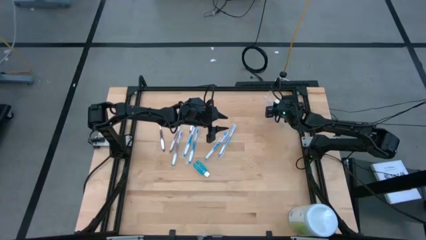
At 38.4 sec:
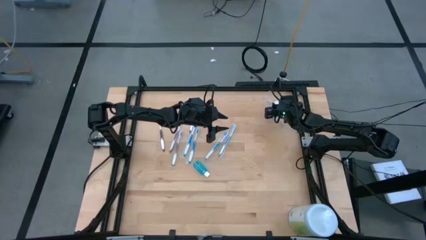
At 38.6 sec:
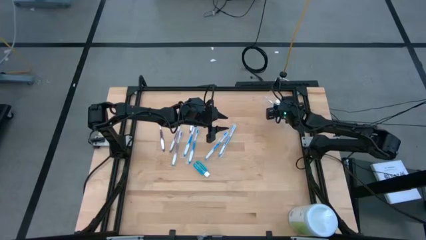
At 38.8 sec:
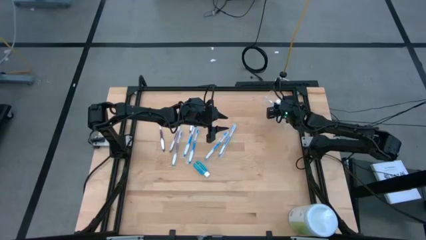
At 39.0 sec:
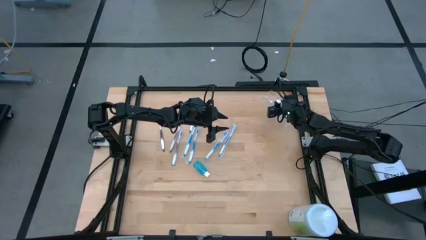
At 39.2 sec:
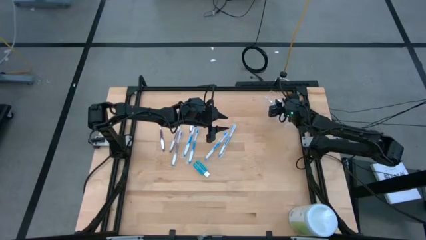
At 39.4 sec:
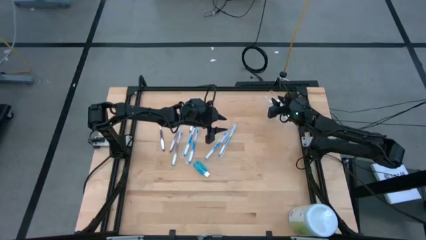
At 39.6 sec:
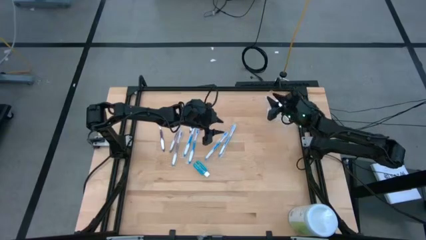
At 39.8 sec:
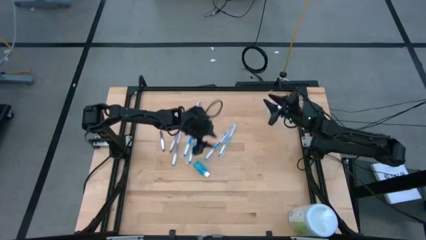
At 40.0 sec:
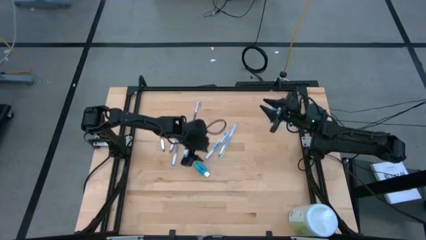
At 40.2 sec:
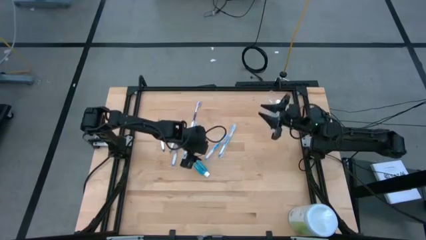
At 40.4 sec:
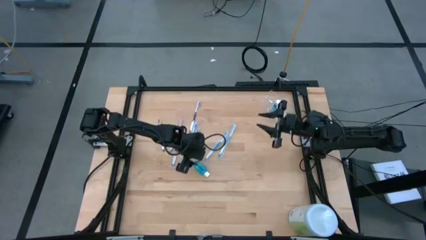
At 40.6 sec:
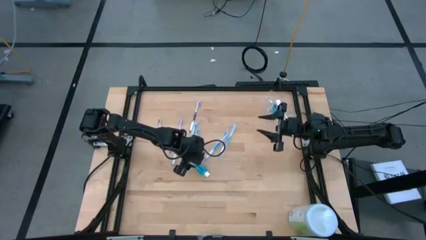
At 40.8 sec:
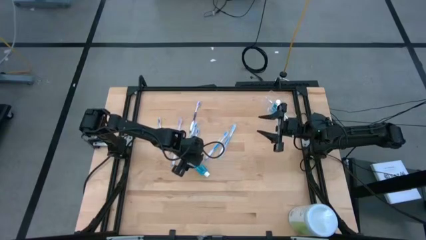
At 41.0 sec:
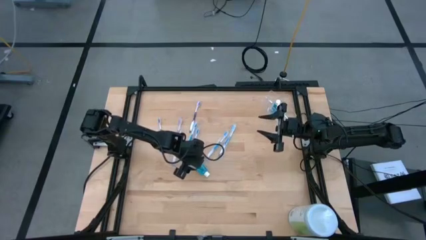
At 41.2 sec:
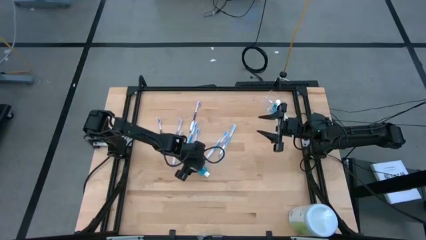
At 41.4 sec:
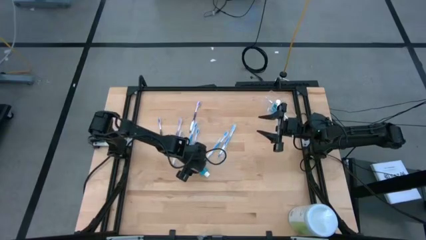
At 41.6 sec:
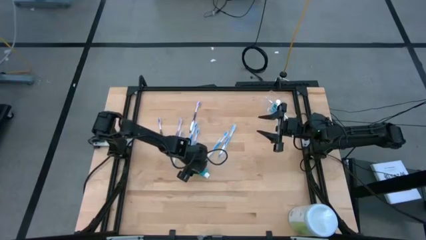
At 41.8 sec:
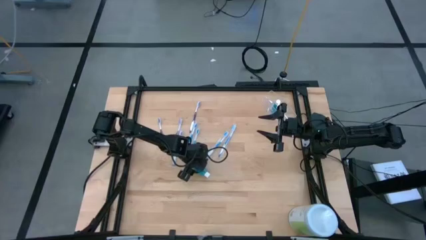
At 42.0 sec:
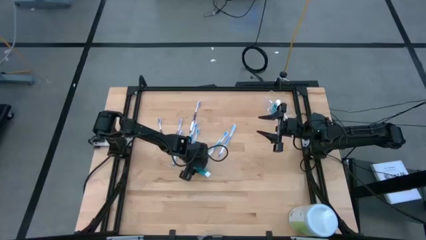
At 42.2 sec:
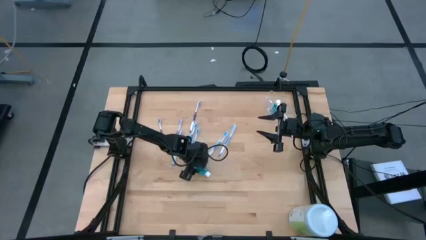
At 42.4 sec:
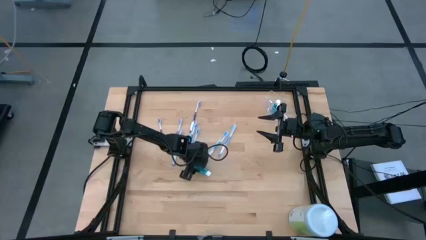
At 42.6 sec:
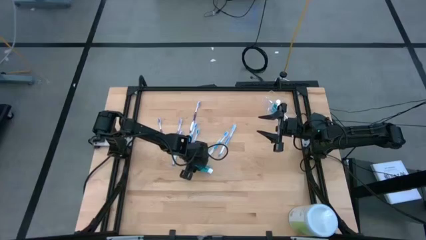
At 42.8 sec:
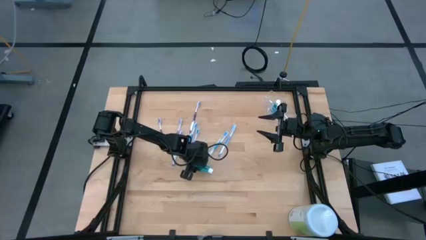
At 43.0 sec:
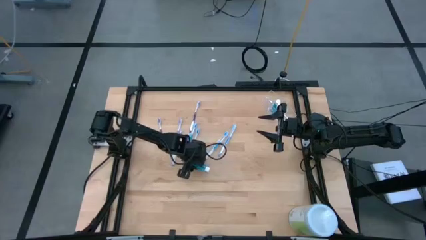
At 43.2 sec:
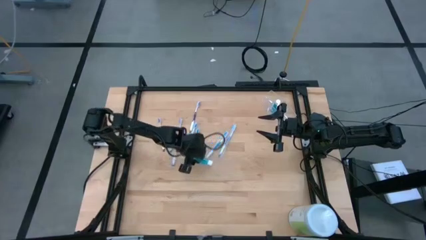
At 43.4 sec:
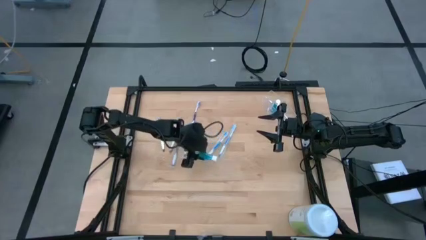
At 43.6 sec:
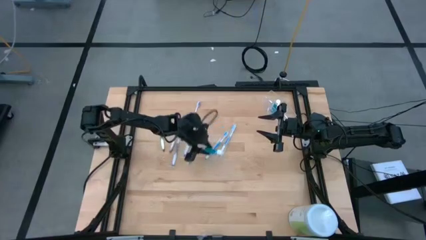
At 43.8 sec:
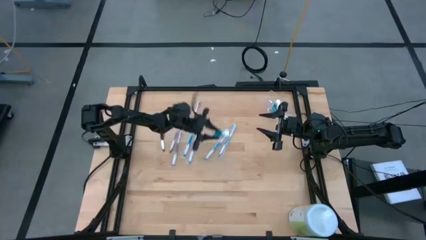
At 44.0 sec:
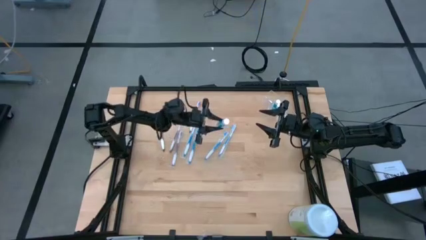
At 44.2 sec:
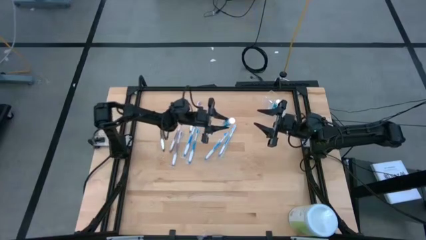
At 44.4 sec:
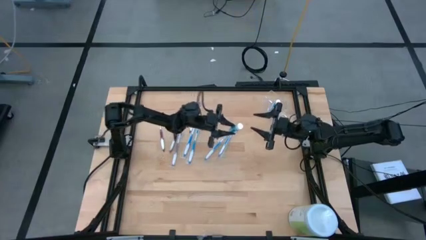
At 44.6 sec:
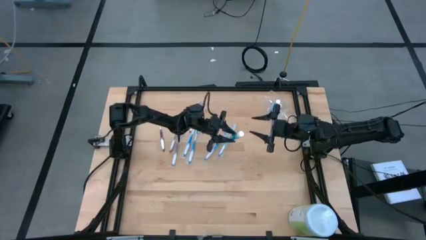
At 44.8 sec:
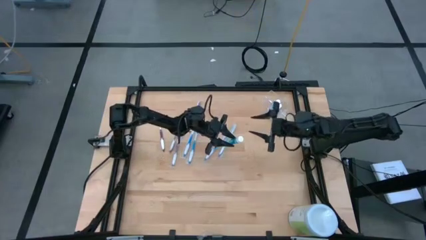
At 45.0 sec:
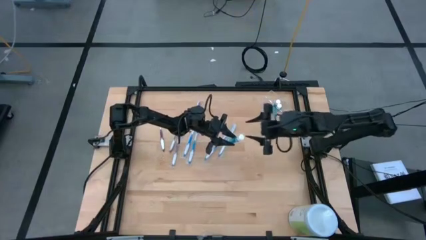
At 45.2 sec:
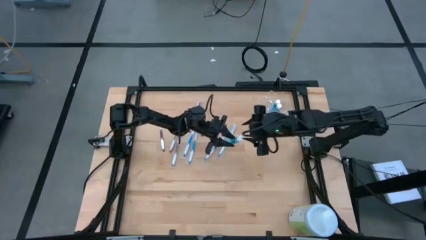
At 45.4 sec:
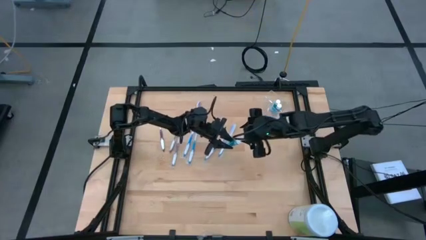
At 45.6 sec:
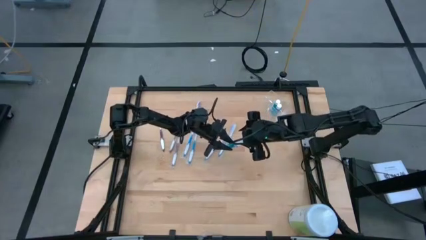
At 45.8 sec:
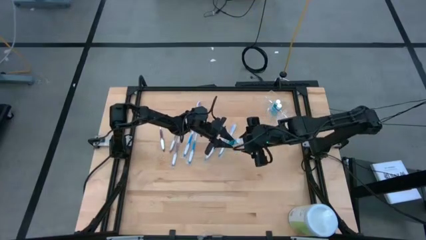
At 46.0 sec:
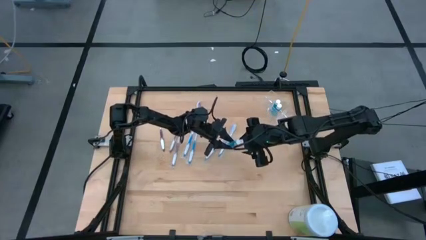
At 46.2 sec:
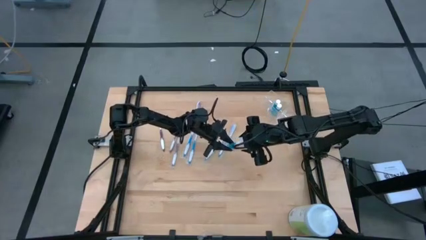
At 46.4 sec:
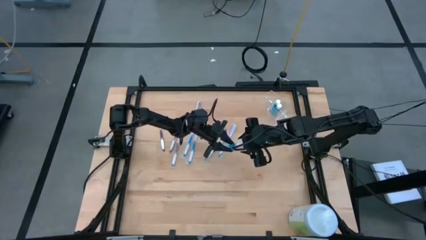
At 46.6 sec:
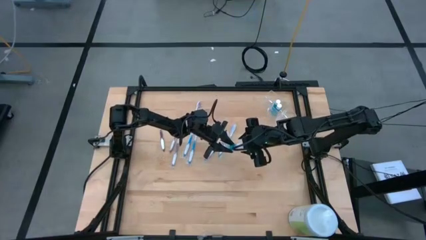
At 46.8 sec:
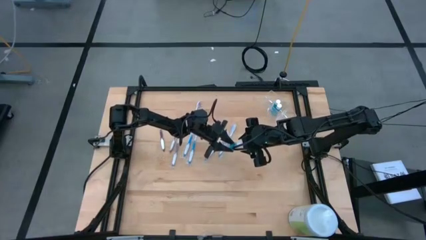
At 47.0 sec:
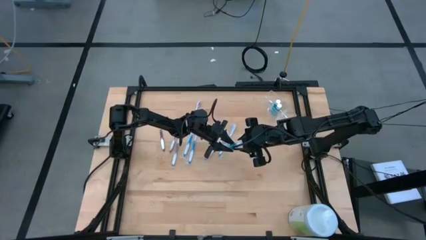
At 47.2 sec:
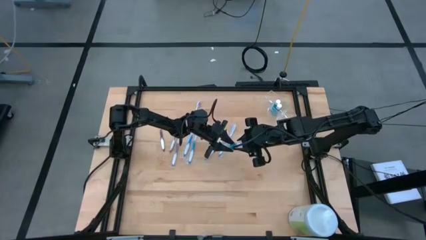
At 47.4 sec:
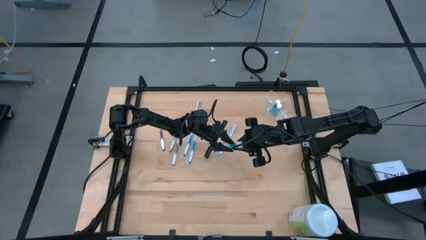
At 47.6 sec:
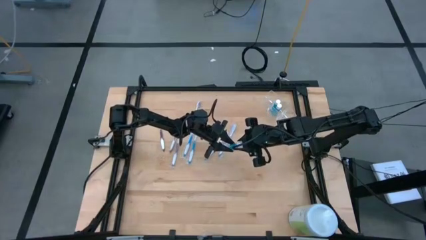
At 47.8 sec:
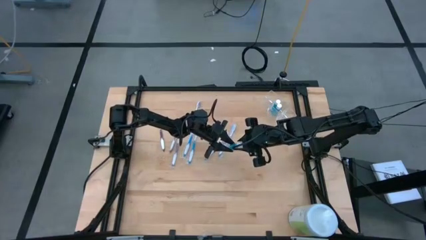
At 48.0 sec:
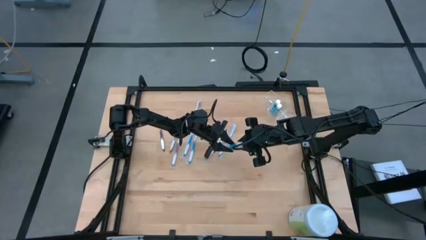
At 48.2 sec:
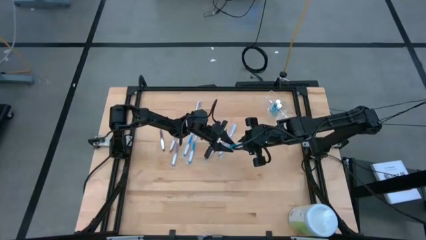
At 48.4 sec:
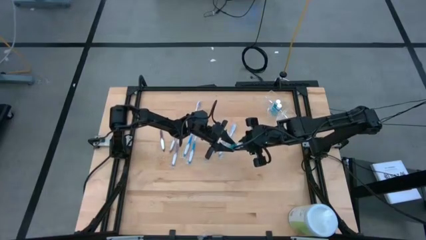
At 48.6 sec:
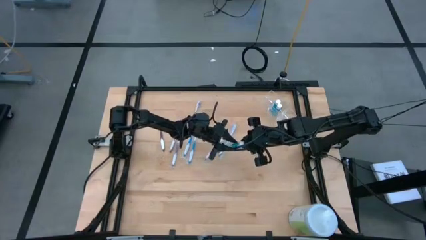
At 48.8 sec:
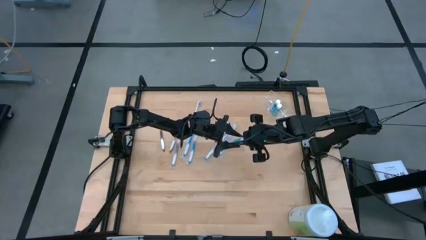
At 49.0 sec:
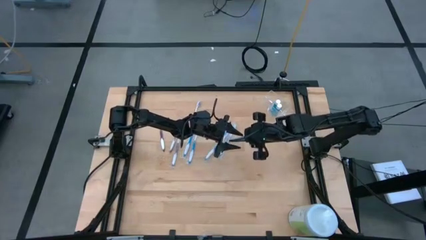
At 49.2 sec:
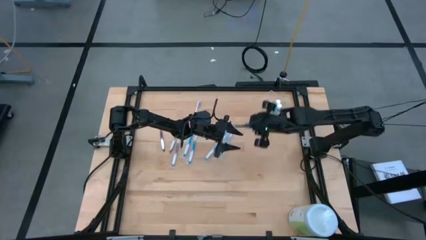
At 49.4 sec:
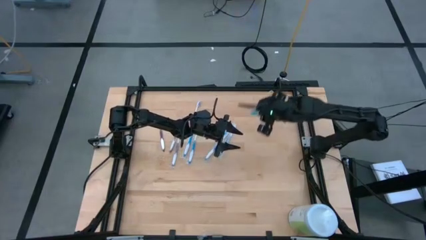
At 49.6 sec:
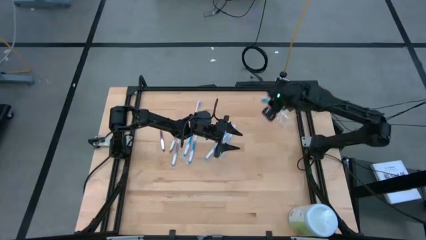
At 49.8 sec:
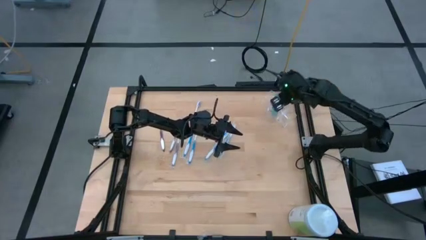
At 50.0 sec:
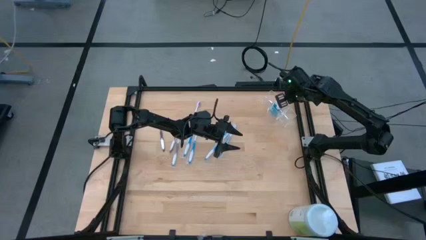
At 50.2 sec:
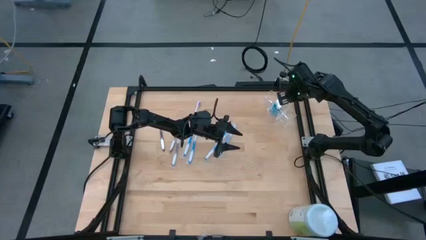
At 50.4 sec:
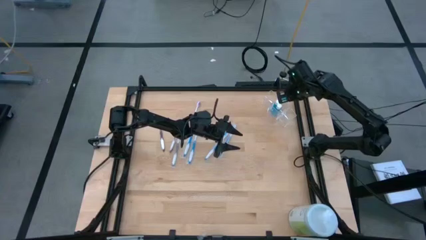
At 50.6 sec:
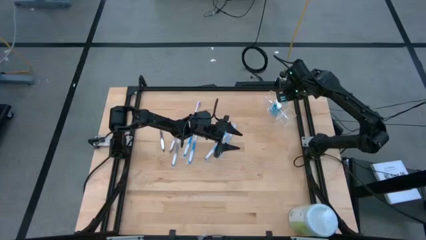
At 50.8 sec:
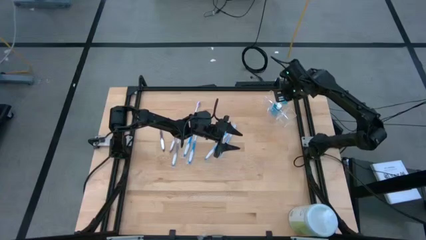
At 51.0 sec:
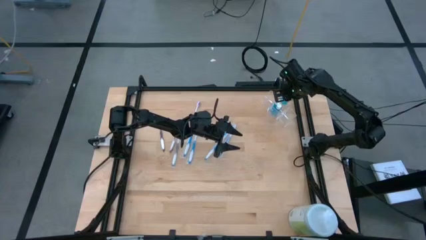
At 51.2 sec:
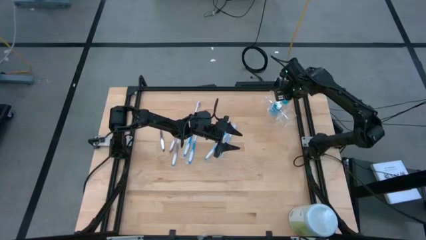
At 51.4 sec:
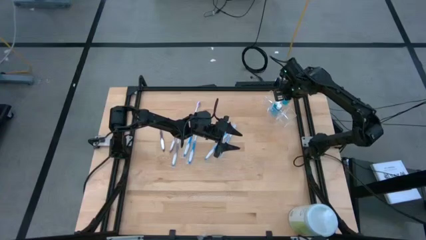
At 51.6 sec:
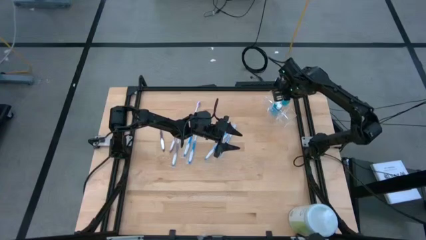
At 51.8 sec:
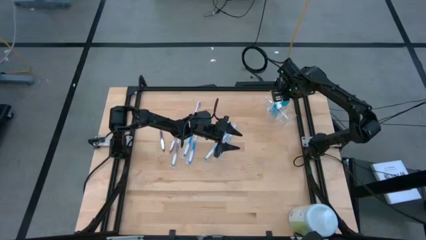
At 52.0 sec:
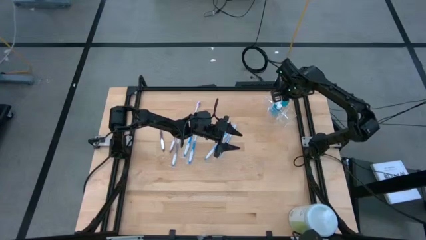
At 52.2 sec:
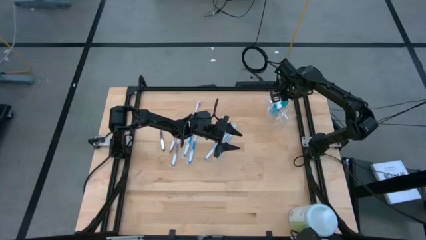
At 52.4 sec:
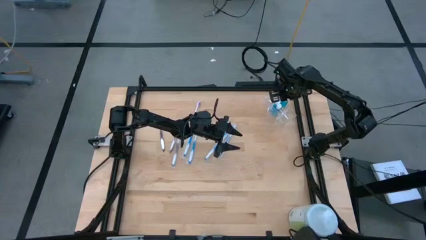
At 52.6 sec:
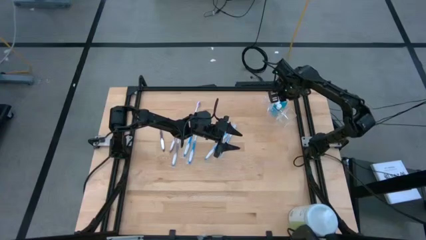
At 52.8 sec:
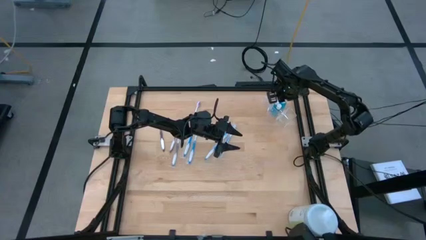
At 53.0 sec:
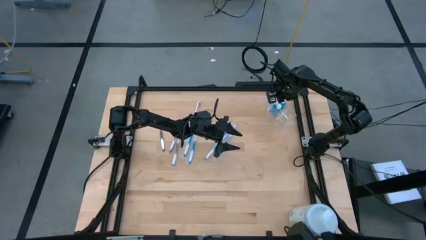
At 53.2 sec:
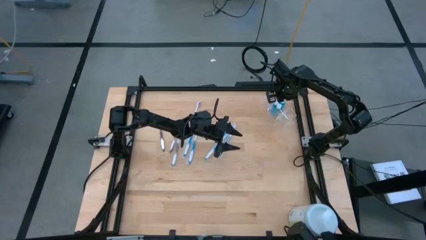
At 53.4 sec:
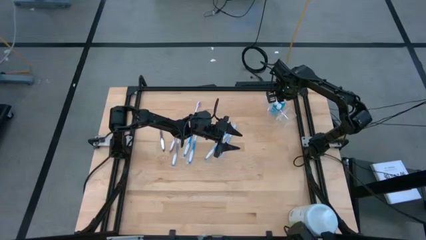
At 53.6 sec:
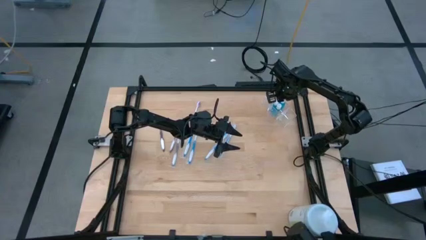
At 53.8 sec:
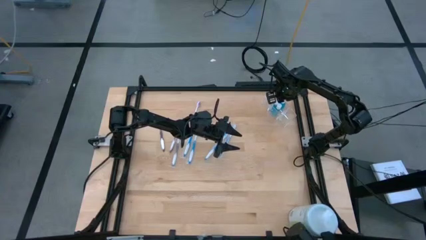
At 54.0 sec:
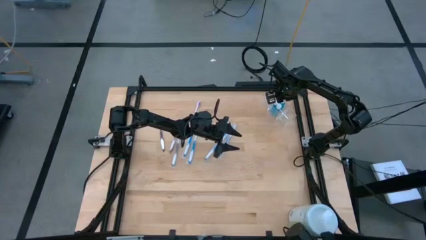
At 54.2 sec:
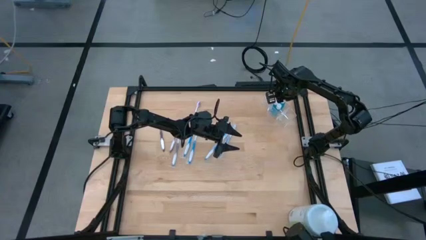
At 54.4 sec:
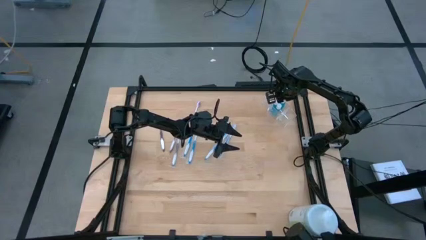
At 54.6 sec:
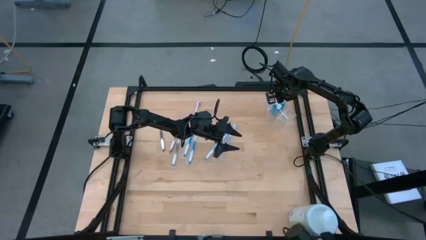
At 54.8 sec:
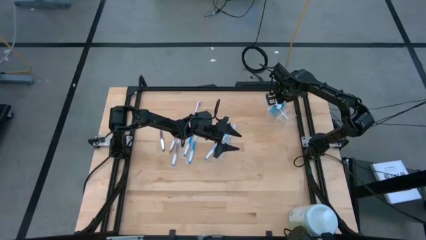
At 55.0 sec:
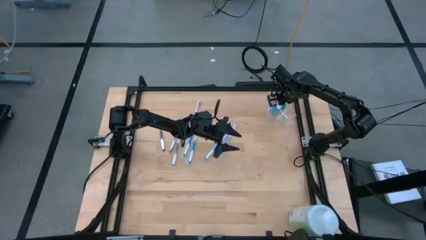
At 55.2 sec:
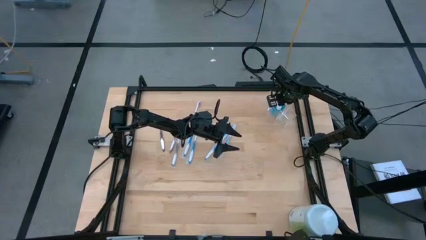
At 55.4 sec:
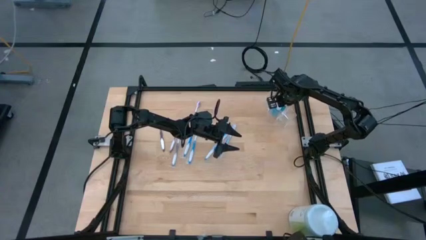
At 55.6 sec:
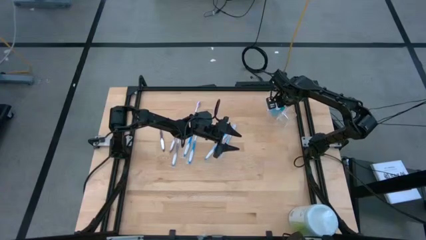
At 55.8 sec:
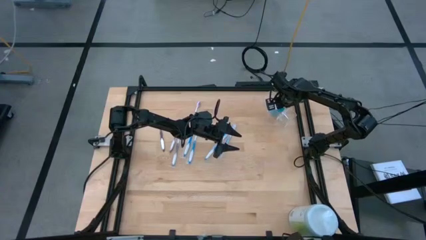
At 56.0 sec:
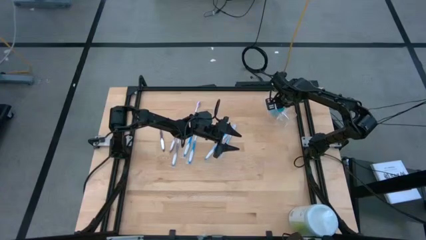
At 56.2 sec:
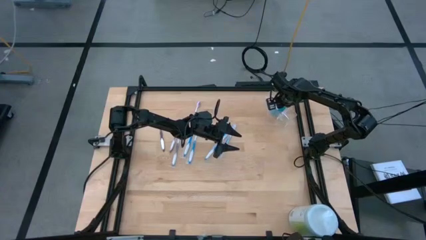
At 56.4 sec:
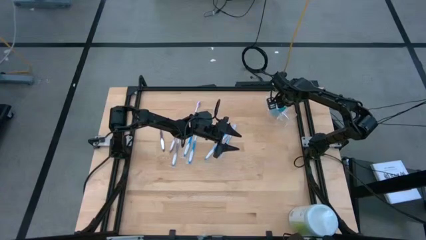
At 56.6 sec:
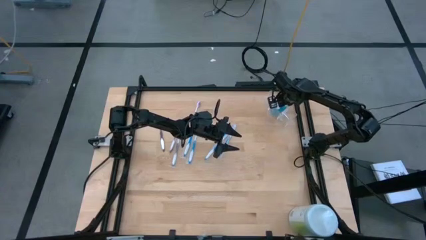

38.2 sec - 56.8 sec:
Task: Pick & Place toothbrushing station
Put the blue mouthwash into the middle of the transparent organizer
